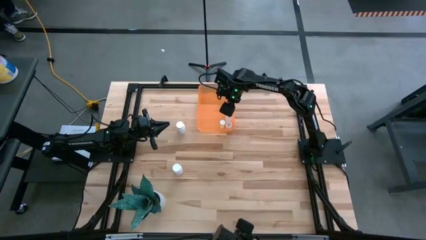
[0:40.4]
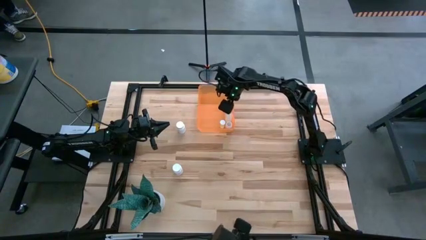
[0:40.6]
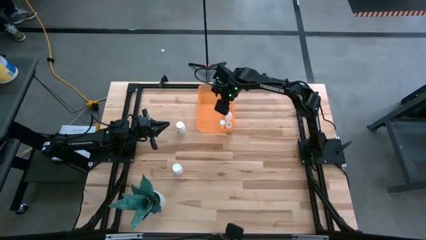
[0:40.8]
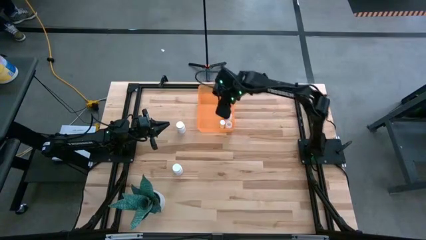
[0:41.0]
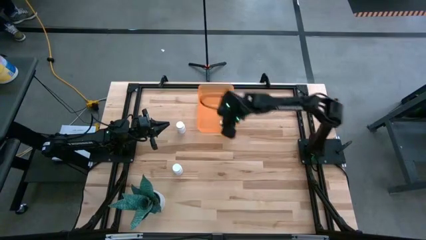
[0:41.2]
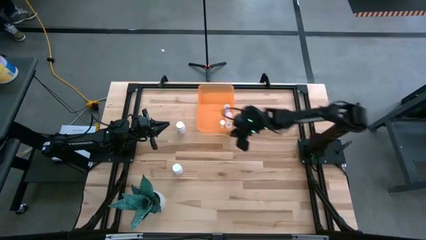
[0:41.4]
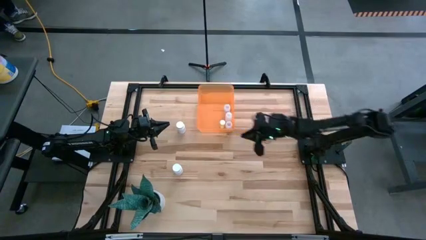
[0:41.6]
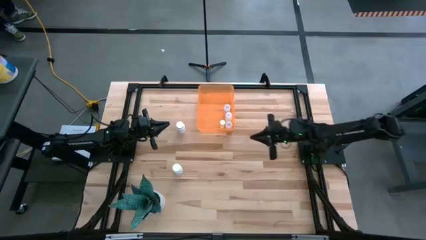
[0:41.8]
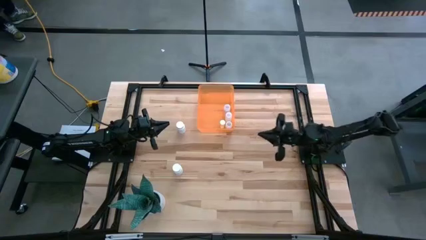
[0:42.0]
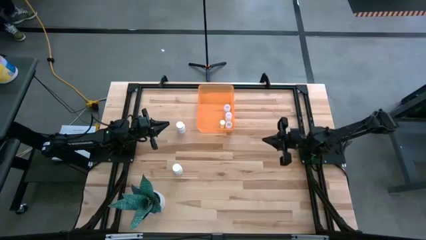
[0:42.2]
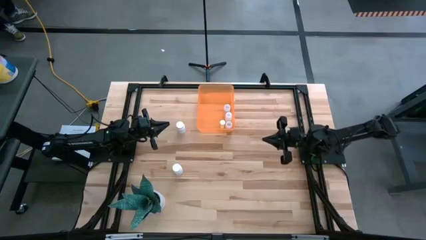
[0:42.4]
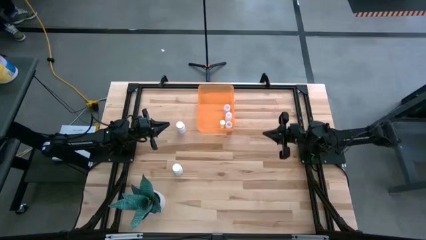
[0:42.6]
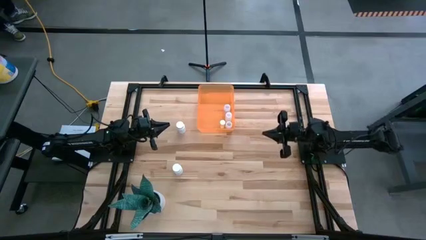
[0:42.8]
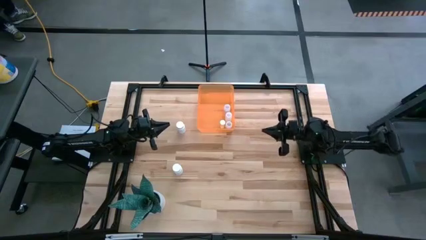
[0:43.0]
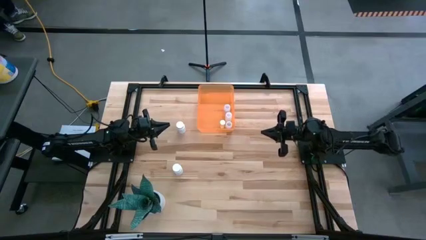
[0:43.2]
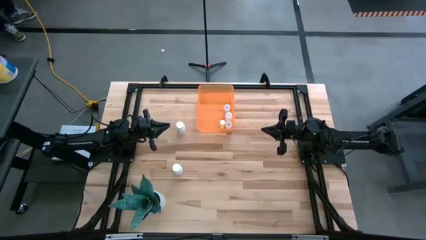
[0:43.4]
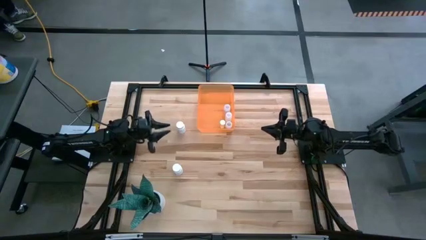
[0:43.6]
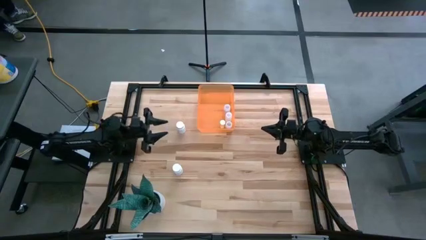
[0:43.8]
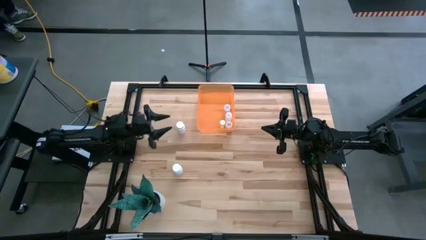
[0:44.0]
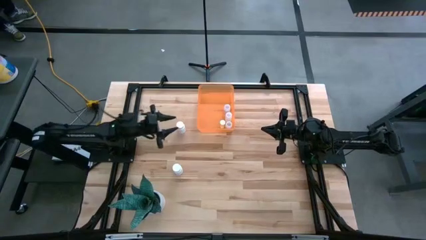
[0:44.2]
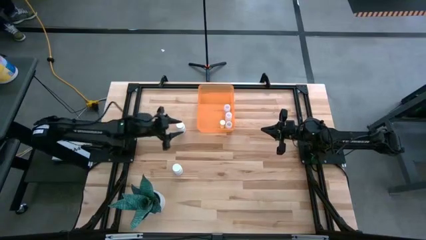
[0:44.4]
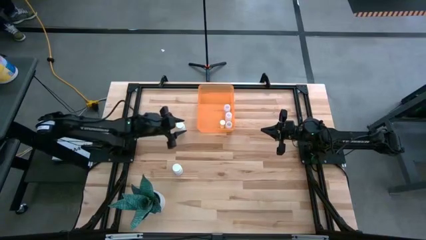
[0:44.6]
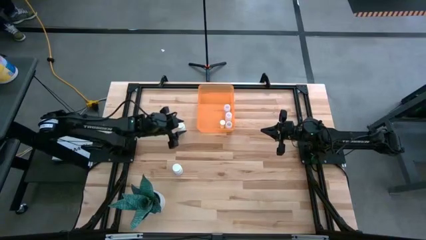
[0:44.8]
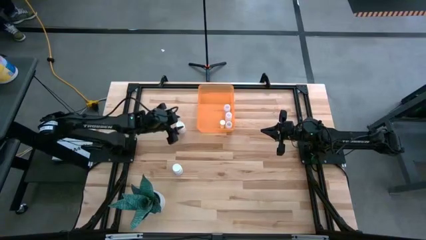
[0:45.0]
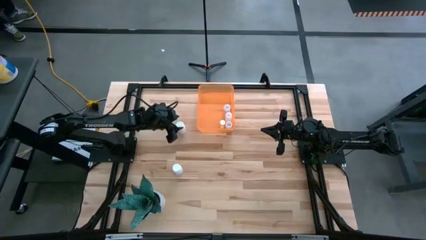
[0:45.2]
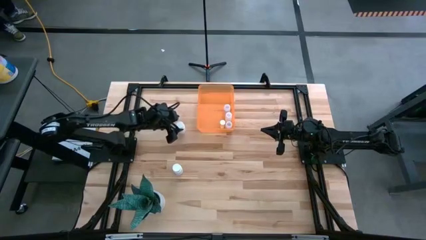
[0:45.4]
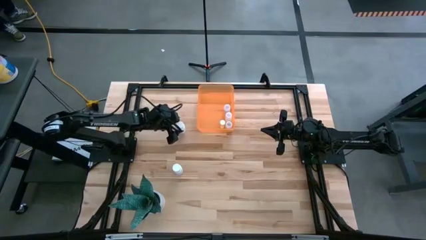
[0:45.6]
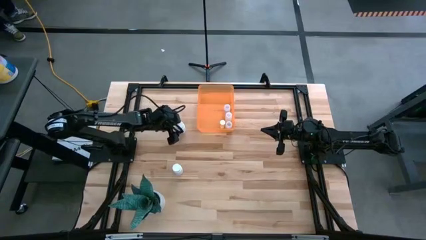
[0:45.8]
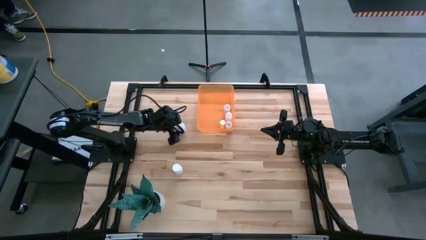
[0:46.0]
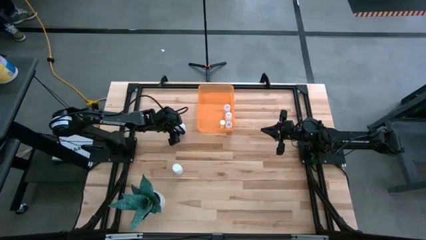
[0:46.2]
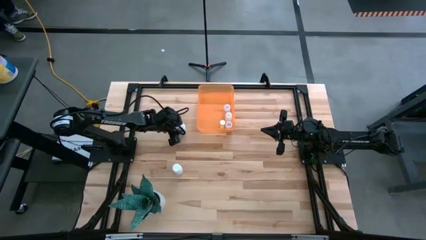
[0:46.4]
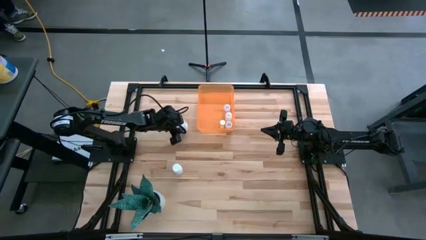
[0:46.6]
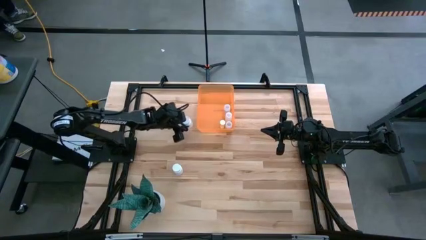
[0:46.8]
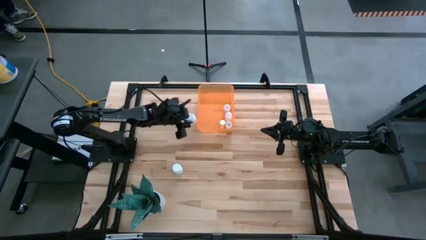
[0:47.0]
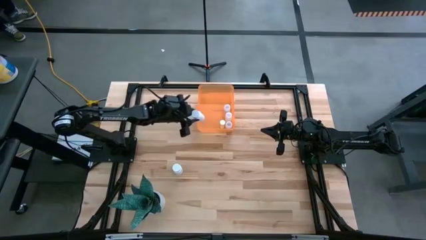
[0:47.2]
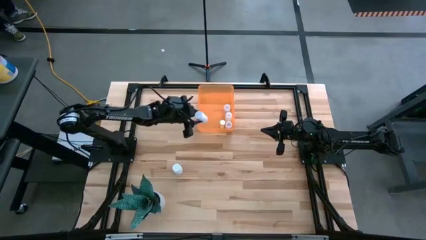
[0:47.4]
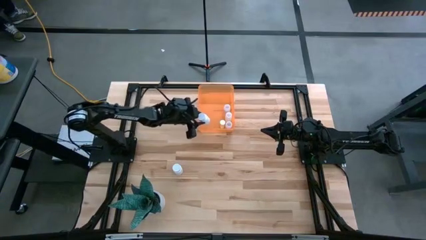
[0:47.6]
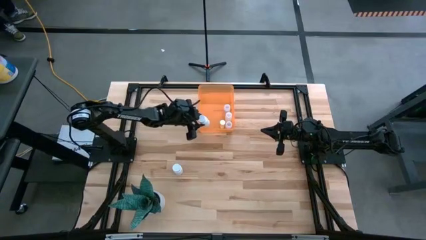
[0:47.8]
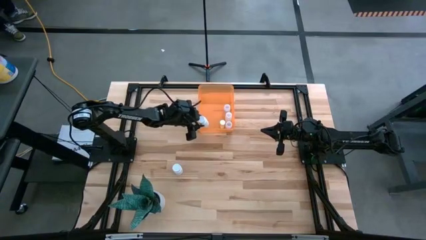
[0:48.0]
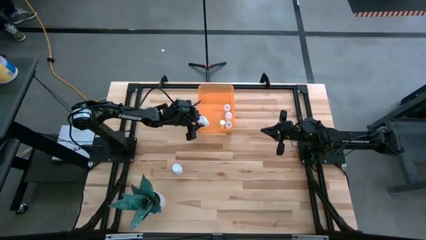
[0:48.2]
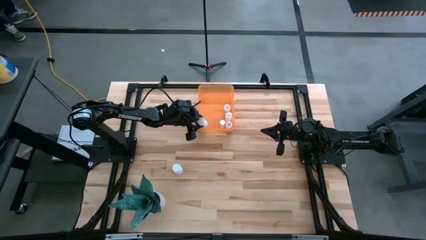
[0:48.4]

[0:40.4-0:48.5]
Task: Pick and place pill bottles into a basket
Put the top white pill bottle into the orange bin

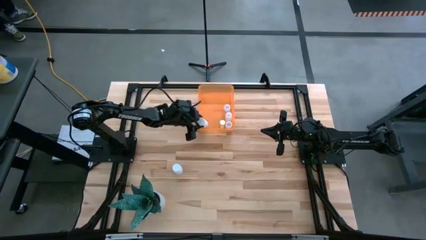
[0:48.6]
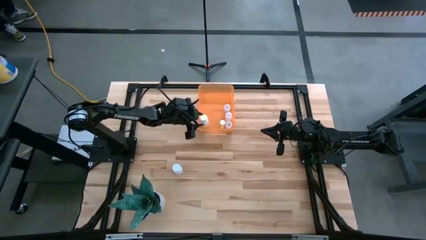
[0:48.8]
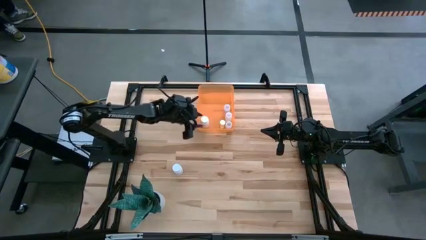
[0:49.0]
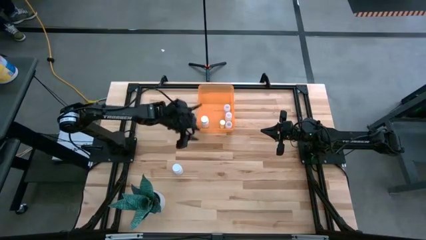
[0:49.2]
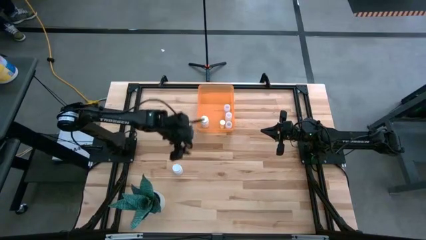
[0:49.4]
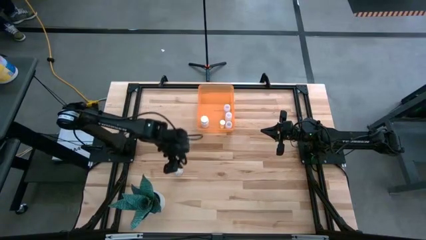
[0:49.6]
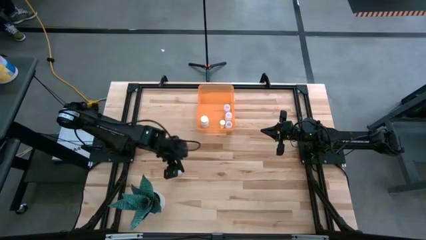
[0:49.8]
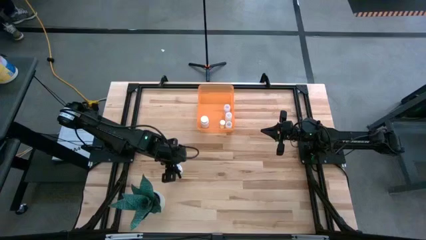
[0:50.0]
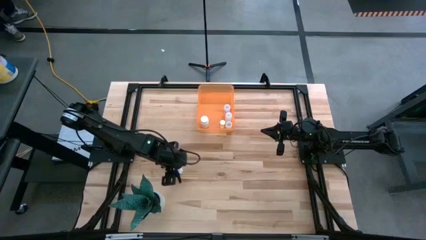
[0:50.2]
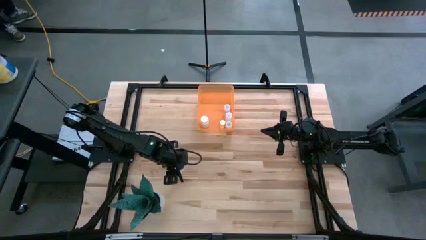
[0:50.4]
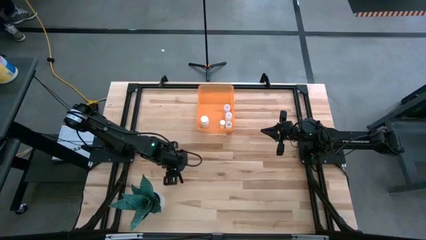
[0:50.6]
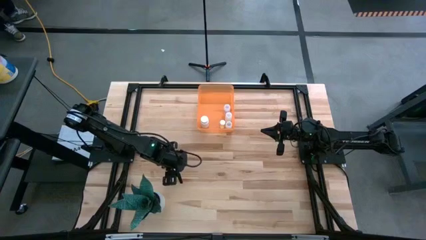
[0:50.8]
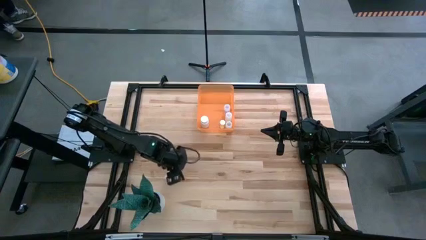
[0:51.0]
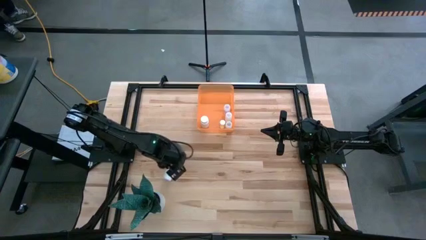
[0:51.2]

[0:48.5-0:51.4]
Put the white pill bottle into the orange bin

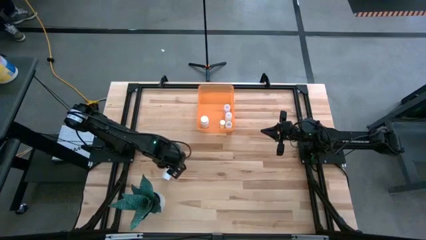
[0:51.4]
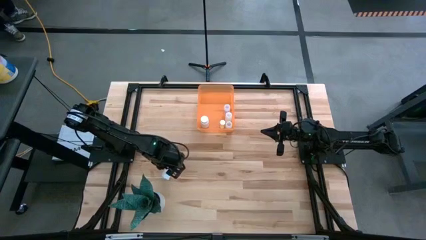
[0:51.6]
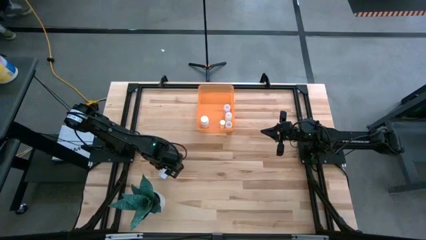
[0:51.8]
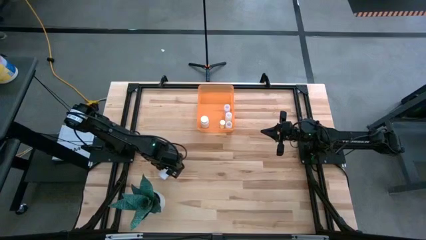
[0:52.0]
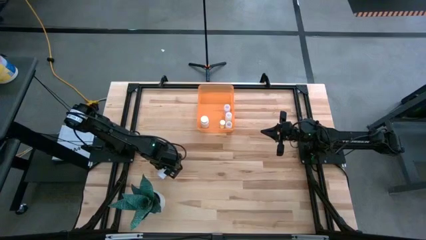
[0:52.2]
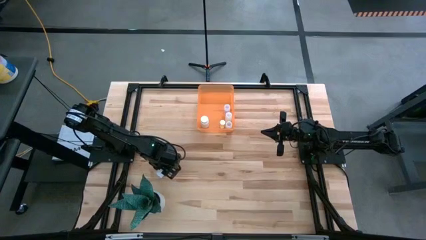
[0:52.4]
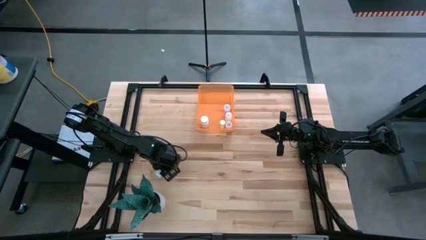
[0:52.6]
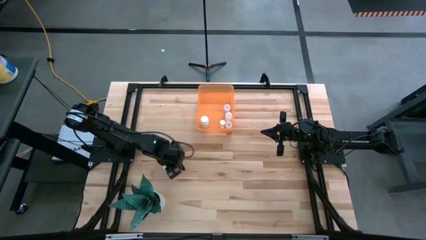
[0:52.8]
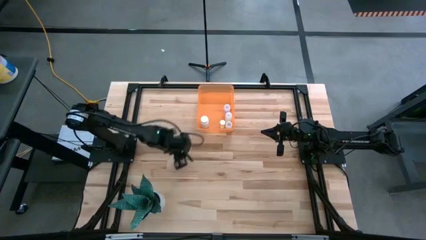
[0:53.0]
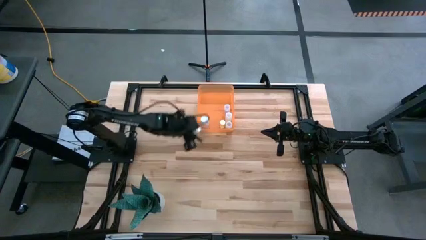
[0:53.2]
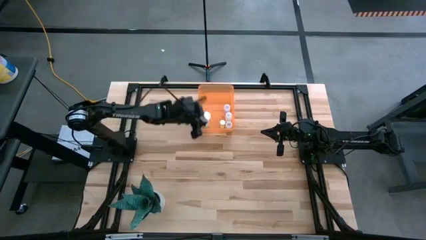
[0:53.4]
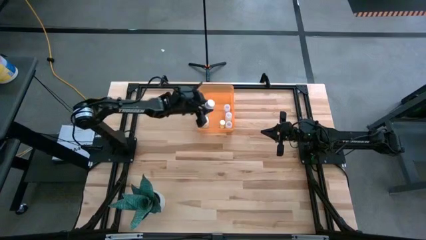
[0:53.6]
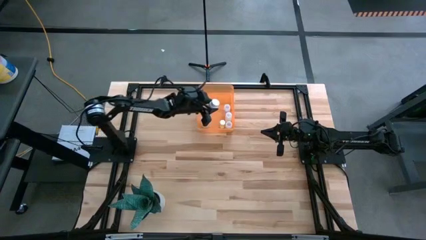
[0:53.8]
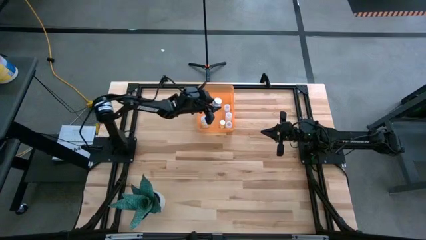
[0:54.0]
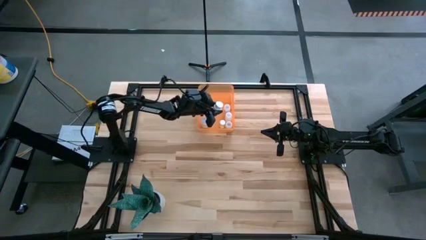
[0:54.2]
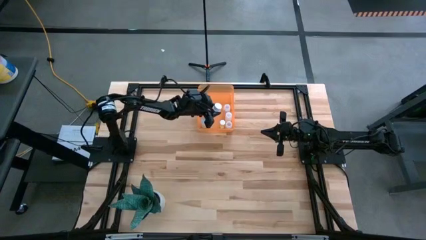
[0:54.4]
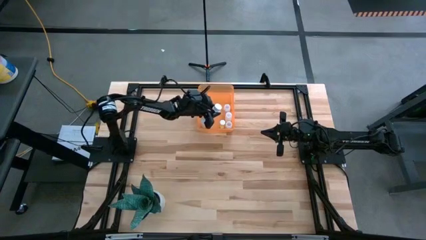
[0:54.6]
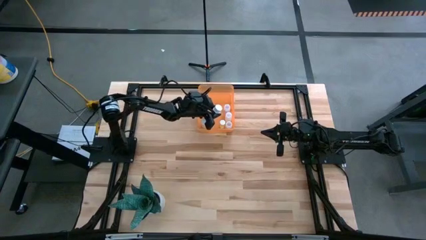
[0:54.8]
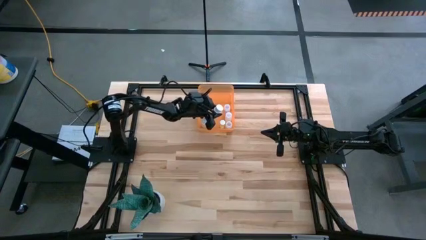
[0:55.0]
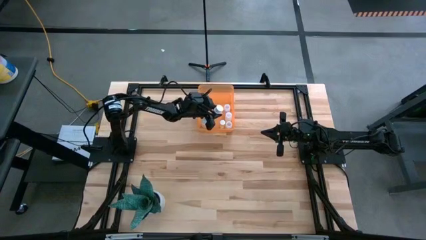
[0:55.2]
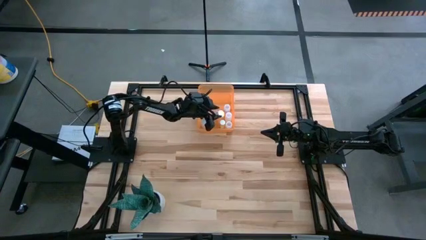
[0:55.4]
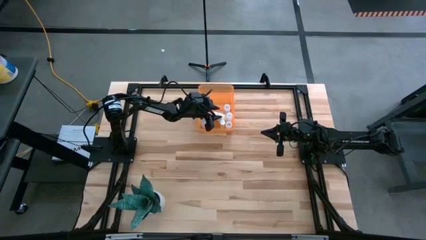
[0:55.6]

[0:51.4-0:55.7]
Put the white pill bottle into the orange bin
